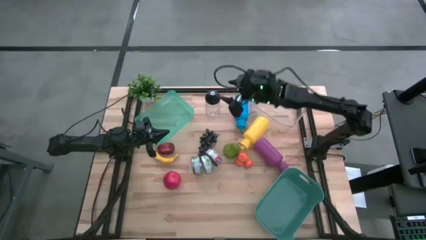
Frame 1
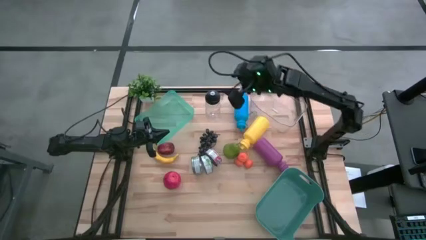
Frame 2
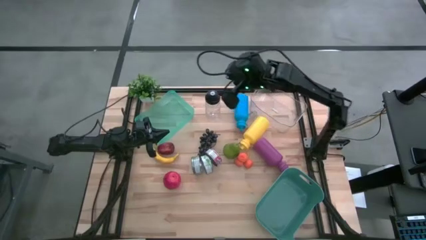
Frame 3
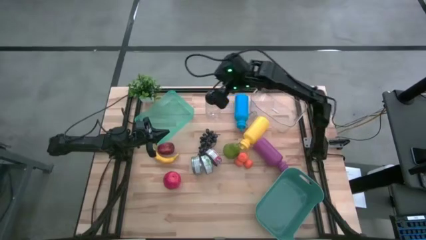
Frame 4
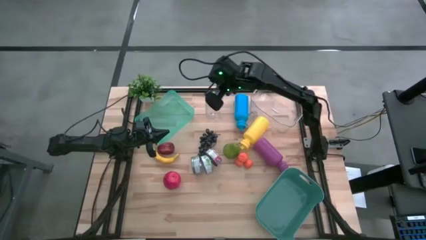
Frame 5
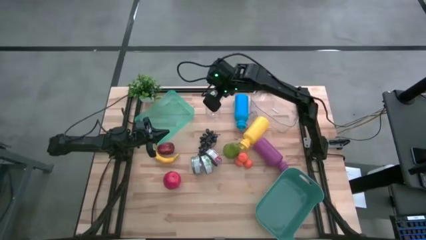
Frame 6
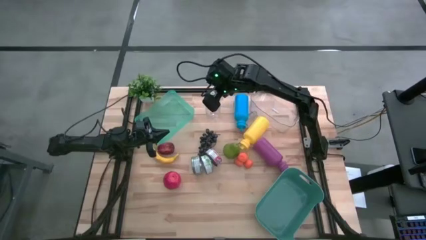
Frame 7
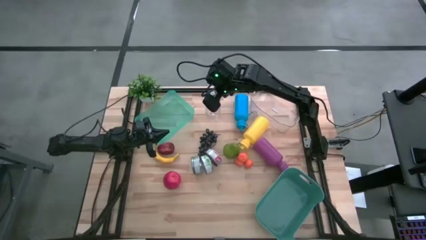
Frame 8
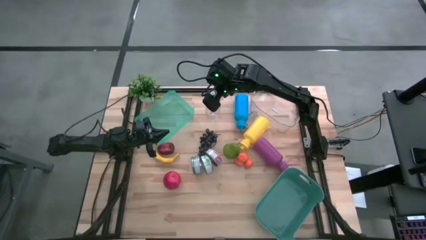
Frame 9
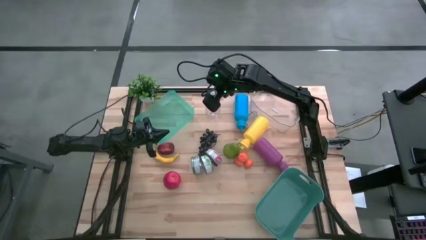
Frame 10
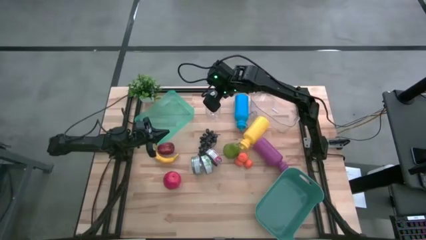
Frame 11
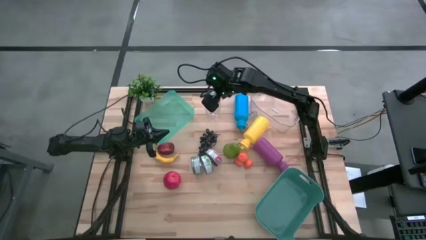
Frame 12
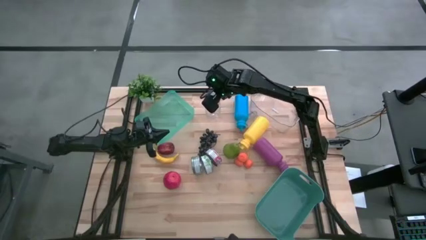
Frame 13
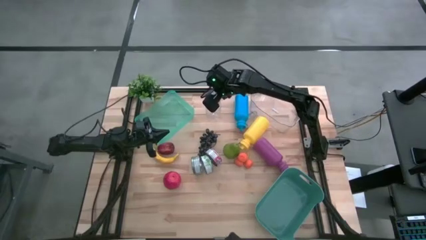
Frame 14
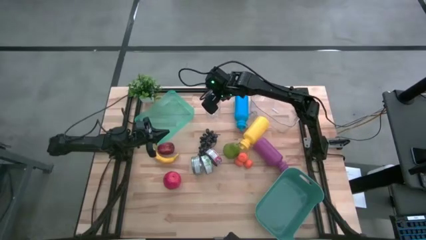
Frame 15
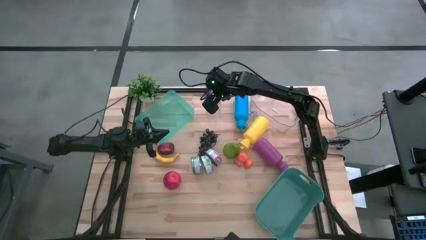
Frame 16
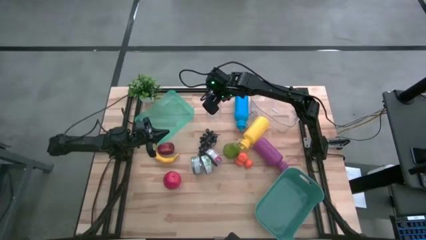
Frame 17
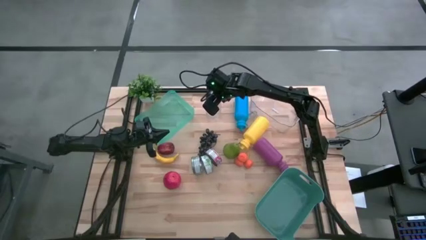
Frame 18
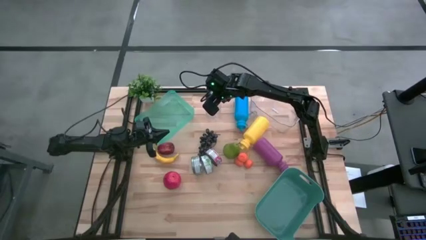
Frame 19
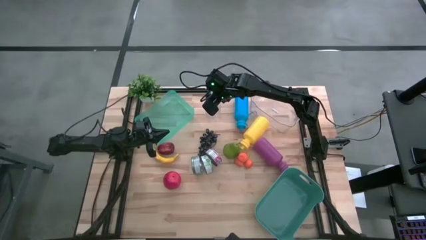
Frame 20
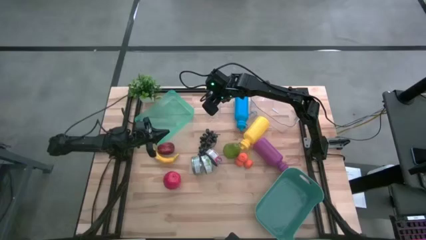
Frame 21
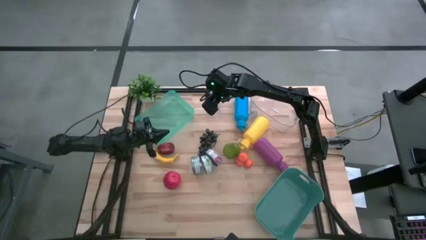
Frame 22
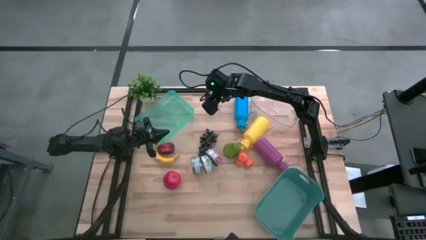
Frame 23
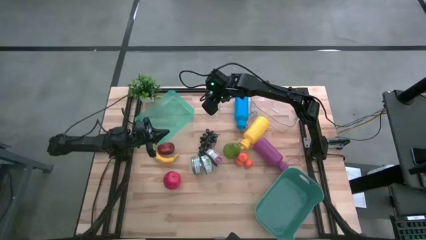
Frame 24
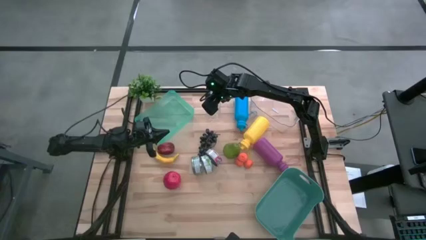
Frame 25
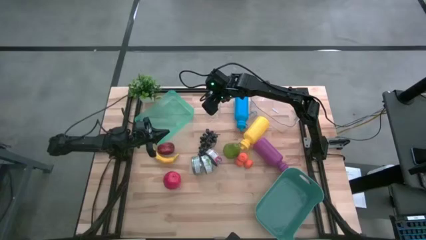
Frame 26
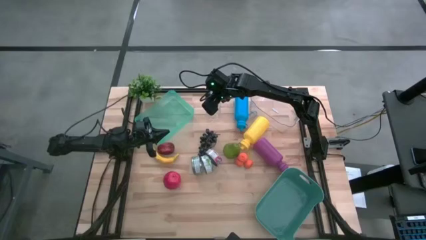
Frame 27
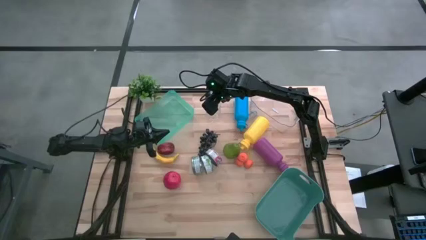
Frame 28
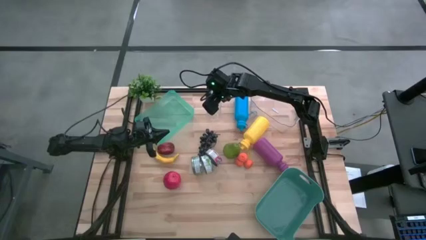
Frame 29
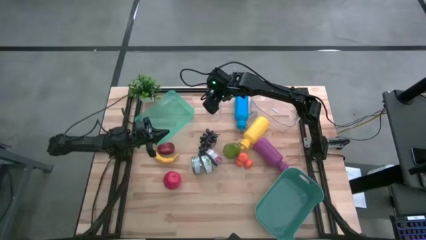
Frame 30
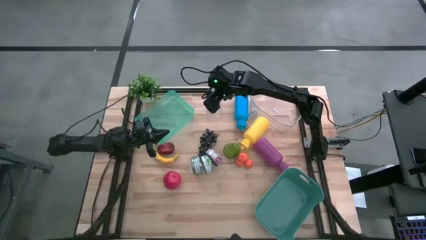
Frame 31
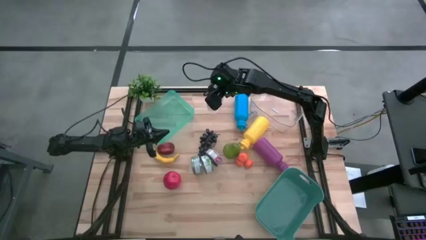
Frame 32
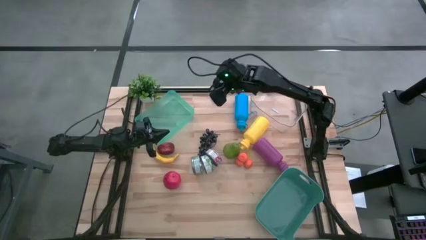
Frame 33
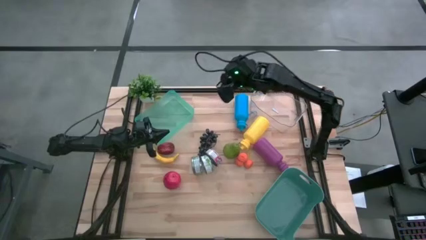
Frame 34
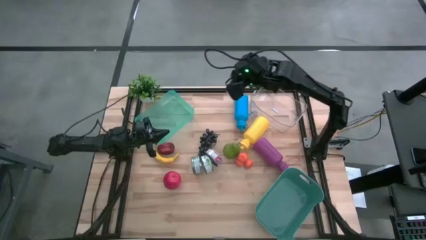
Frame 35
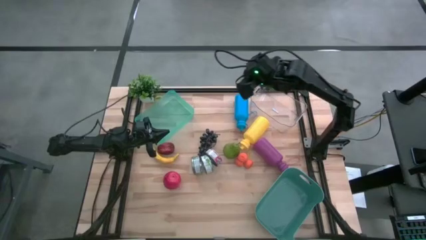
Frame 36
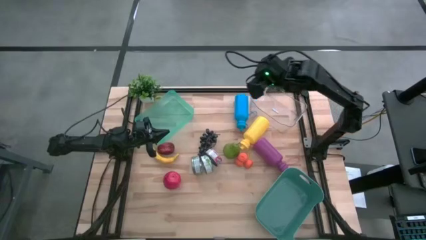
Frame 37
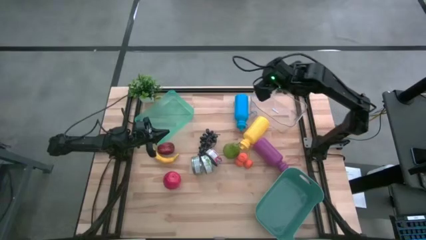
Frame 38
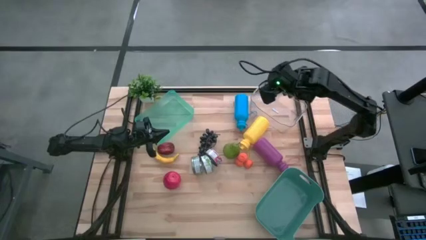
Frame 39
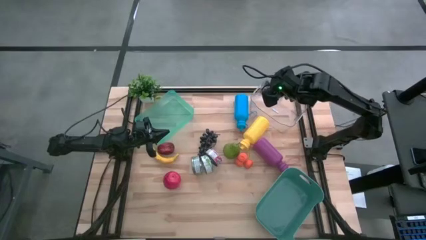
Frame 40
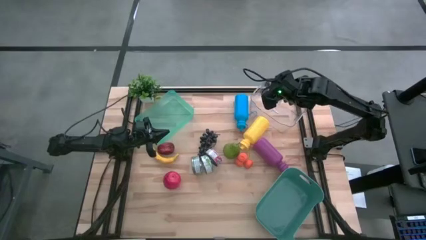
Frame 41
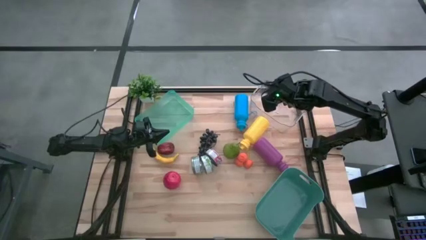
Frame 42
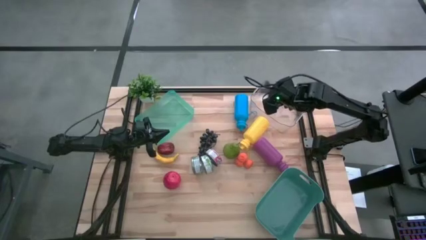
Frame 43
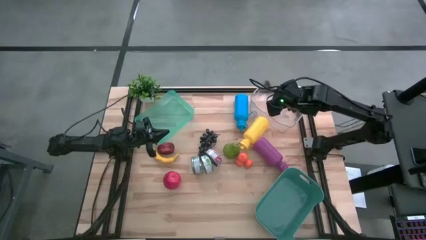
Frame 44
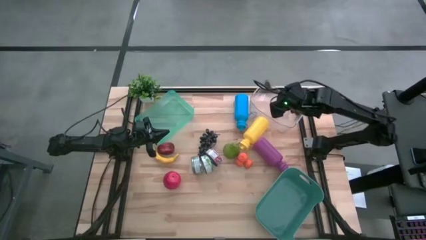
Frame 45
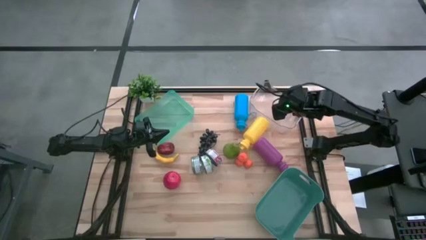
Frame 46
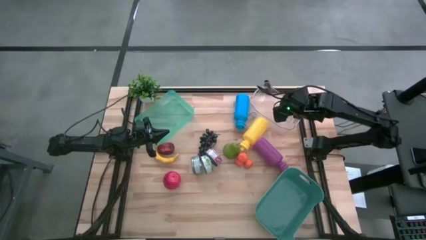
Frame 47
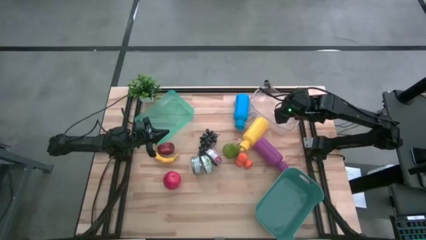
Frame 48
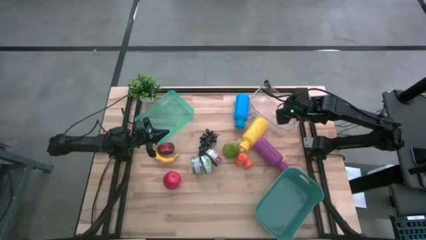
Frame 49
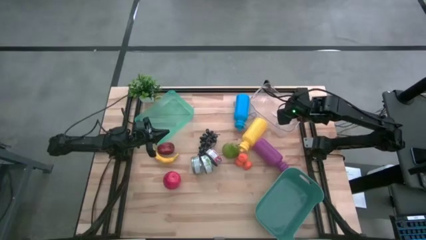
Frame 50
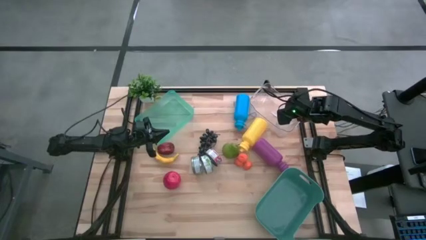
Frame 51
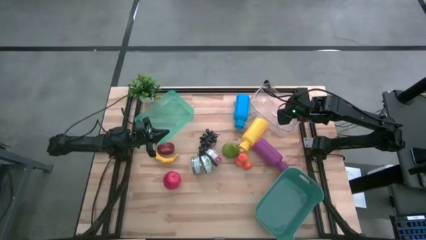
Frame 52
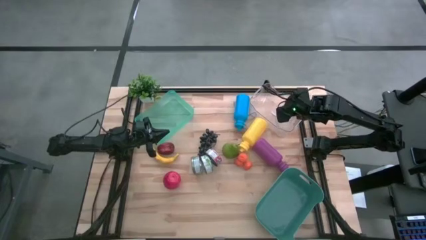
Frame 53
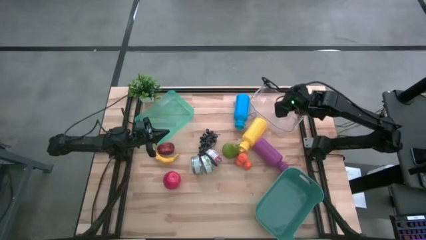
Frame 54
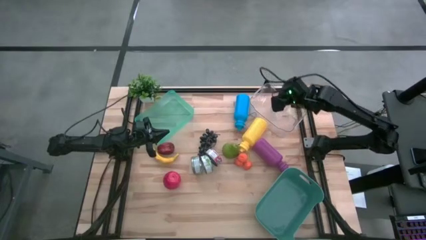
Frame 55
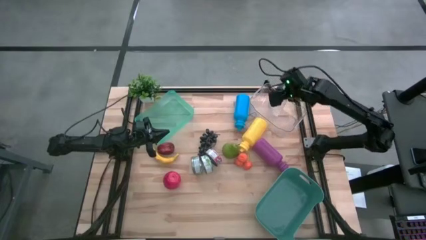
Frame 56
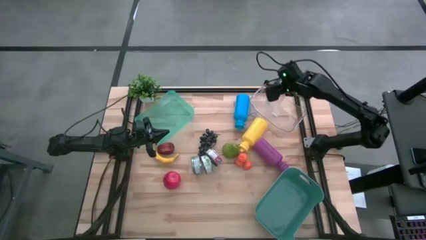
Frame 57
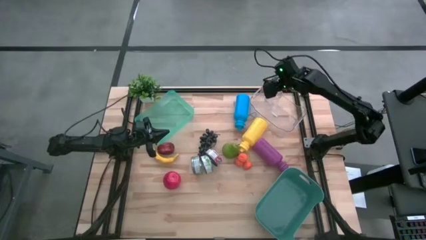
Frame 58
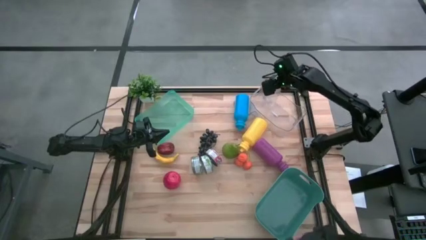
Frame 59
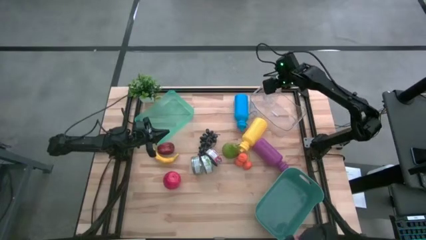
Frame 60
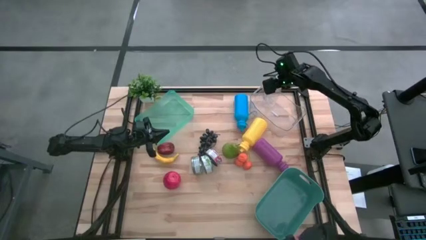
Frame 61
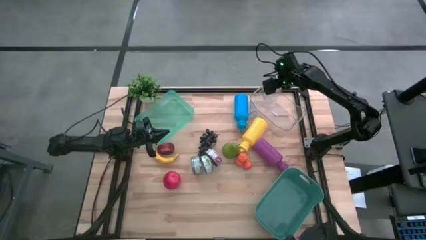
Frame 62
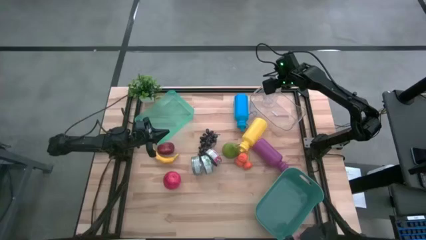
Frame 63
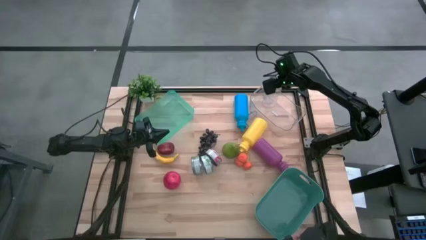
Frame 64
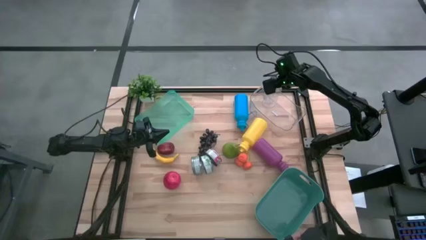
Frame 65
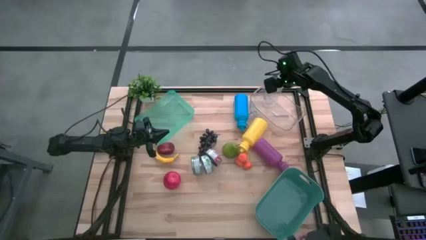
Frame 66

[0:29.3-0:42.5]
Task: Pick & Place Food Item
Put the transparent water bottle into the transparent bin
